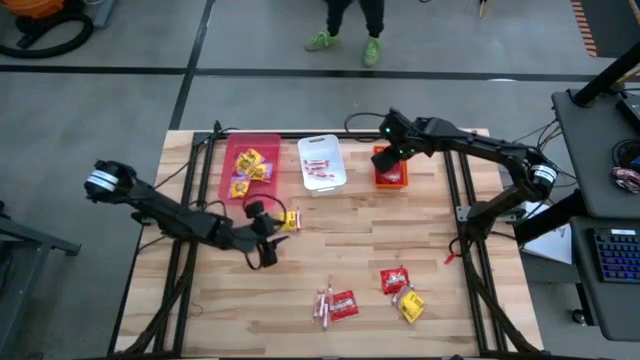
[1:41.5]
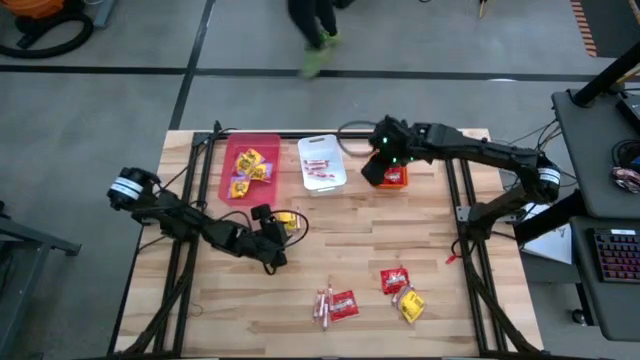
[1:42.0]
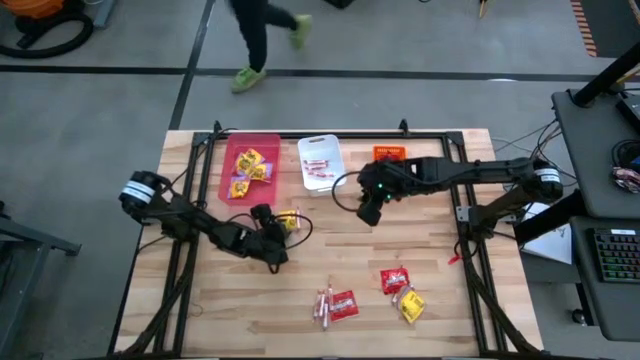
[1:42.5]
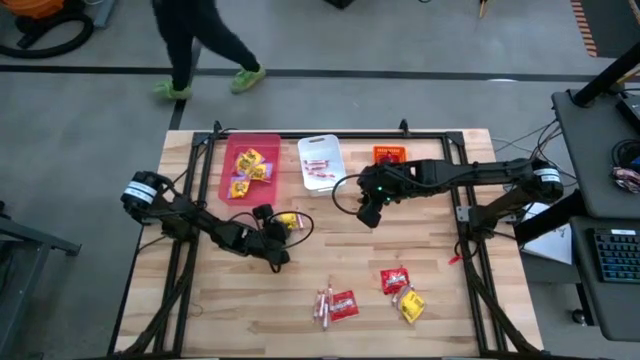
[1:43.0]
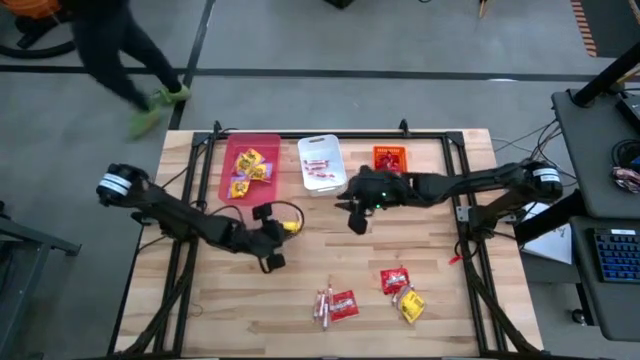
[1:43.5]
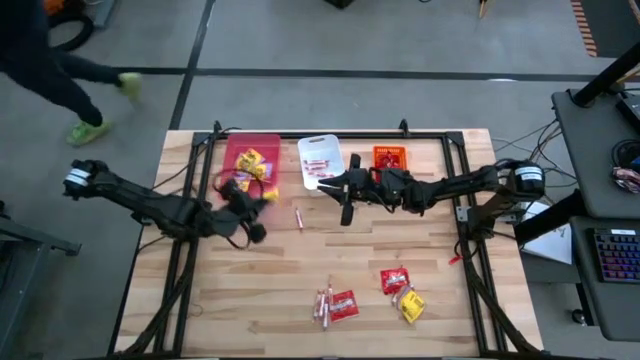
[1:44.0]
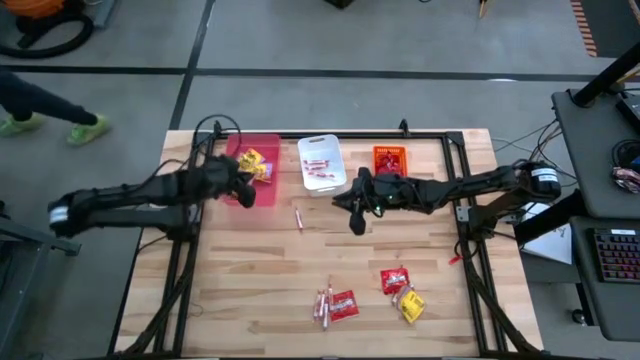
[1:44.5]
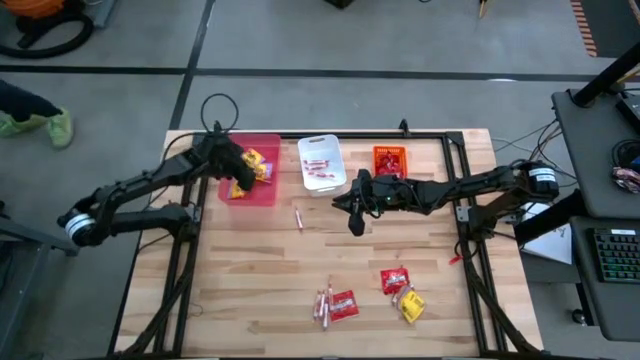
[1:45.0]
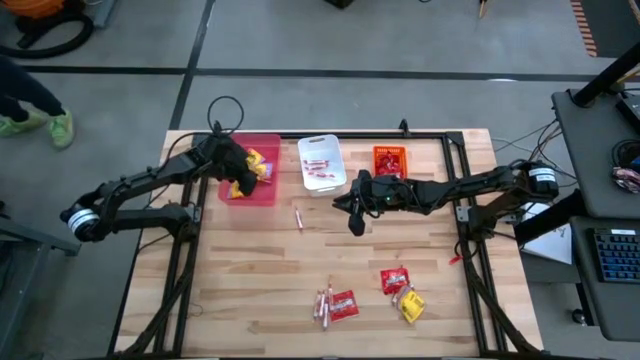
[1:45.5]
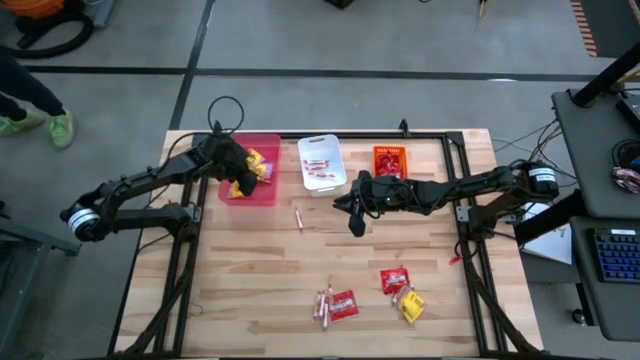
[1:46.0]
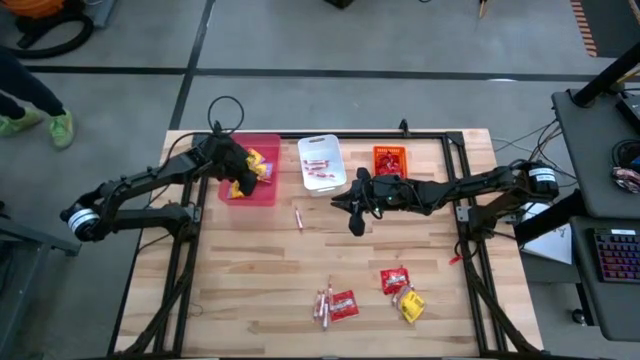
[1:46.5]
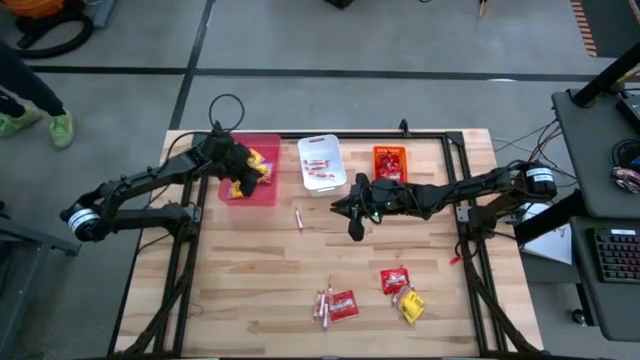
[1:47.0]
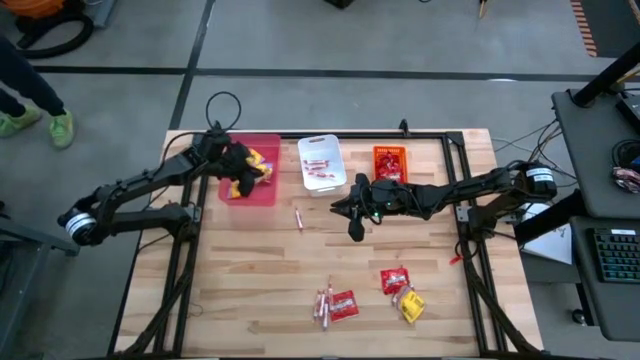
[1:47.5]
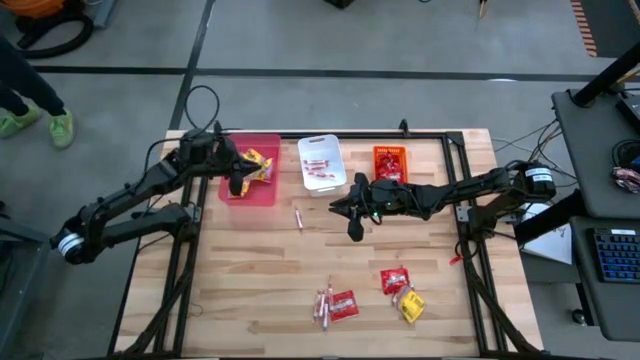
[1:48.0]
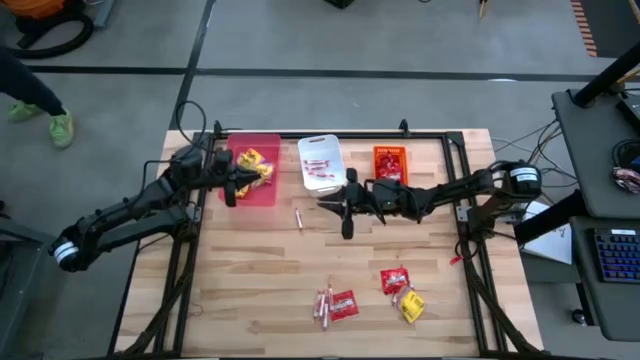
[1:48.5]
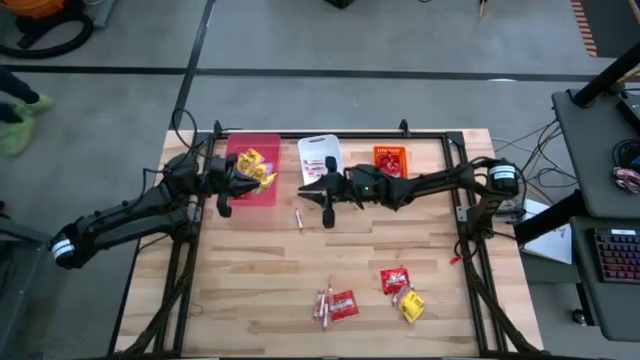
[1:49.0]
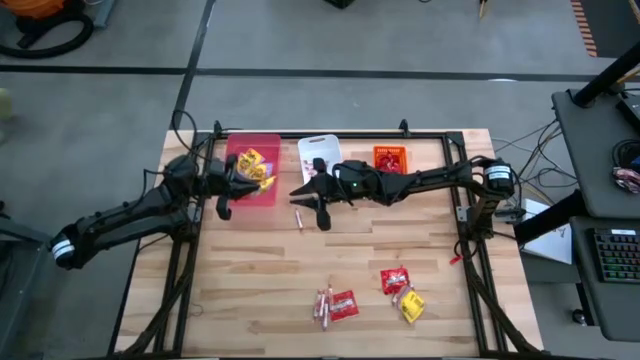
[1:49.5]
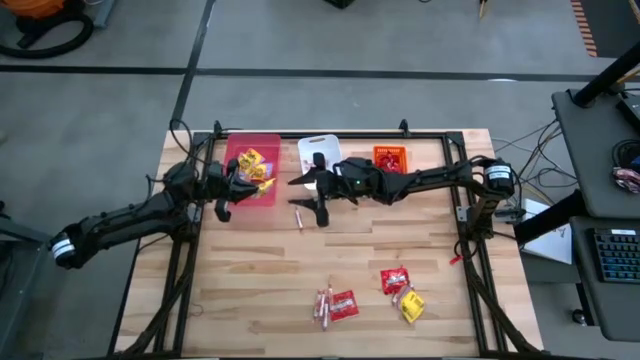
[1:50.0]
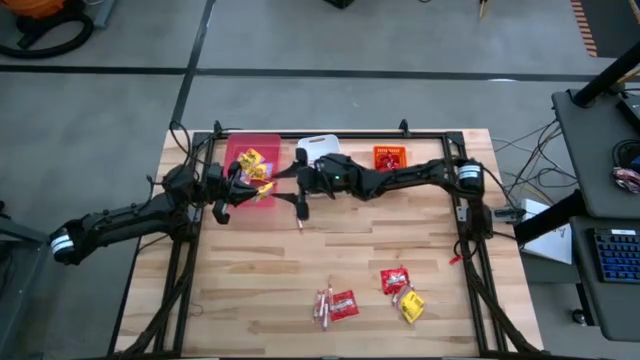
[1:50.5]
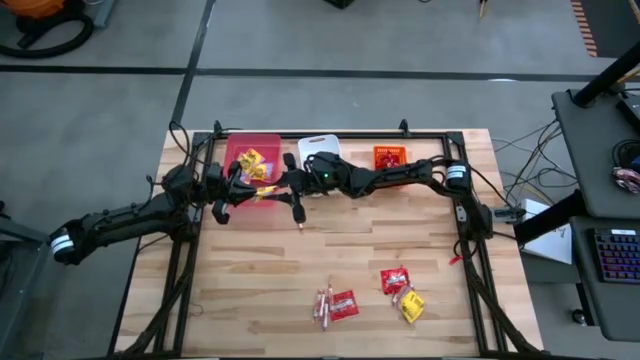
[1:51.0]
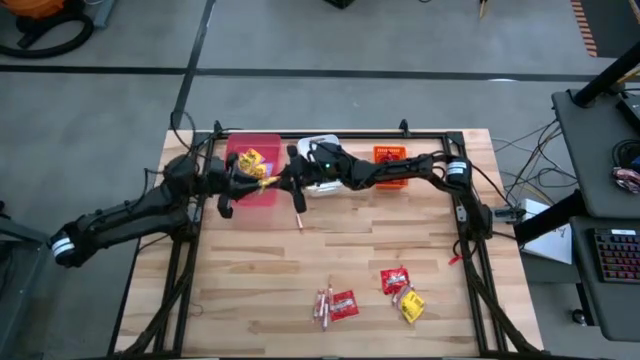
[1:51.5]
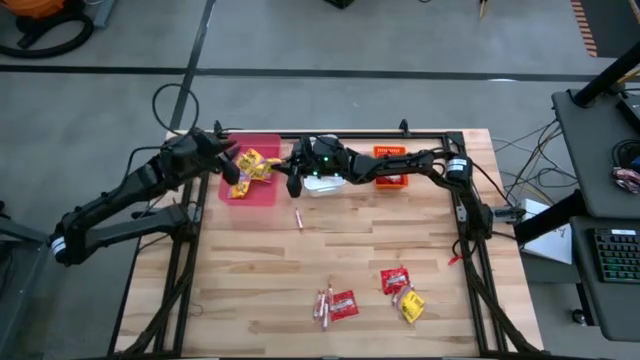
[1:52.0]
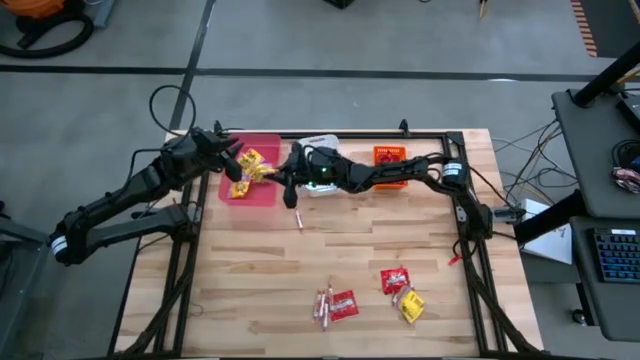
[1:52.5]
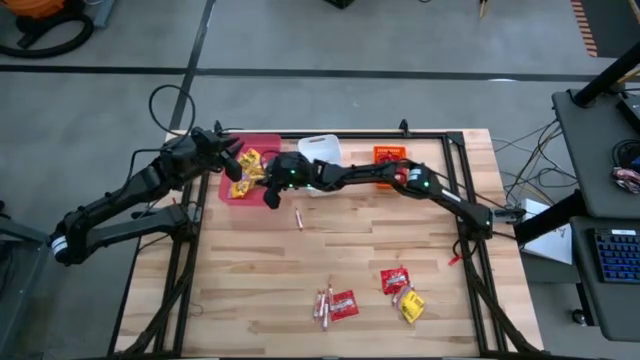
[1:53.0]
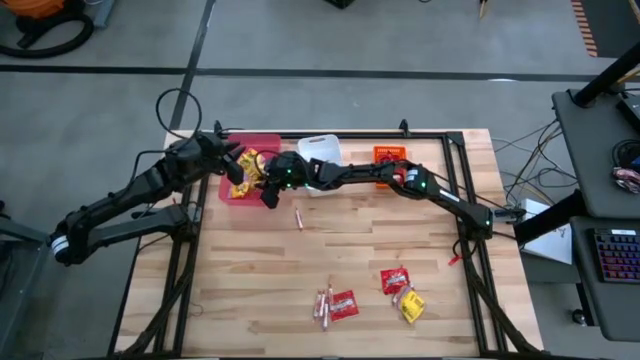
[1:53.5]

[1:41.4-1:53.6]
Task: Sort candy
Put the yellow candy into the pink bin

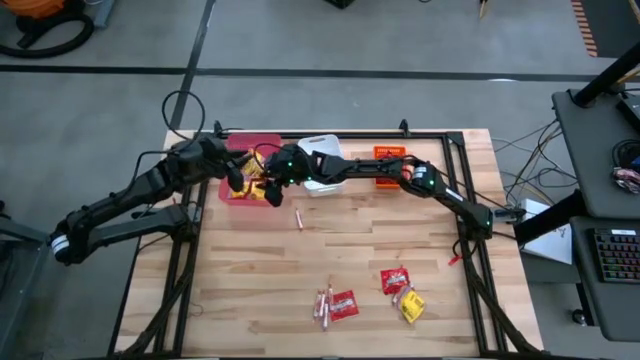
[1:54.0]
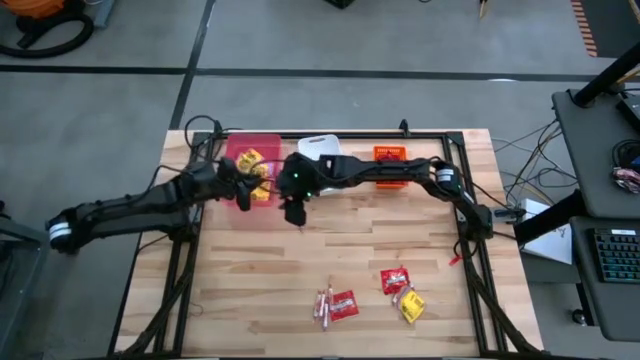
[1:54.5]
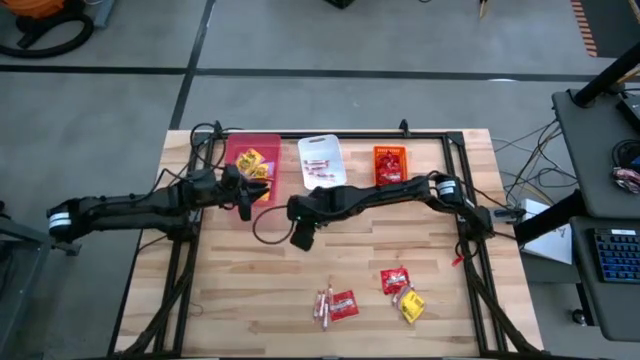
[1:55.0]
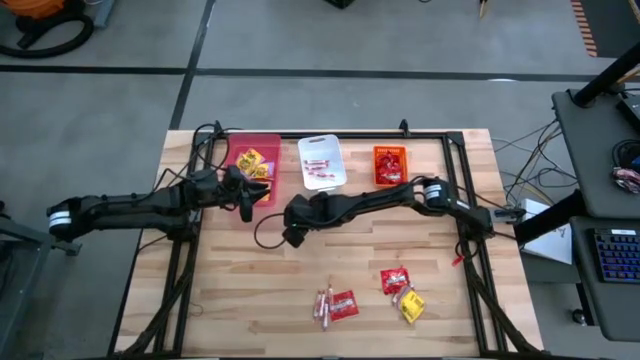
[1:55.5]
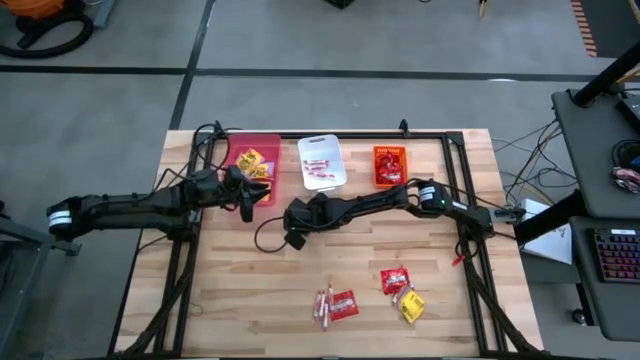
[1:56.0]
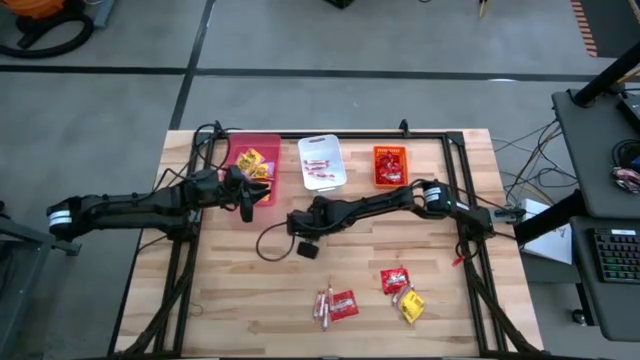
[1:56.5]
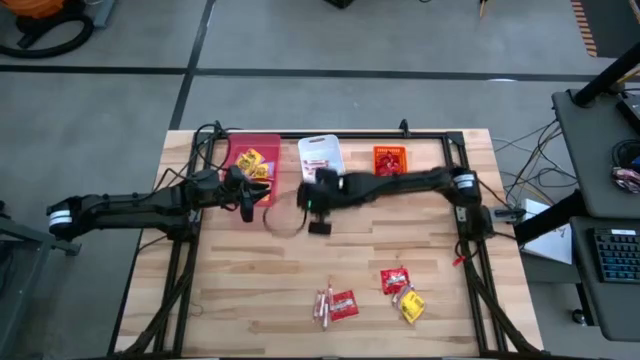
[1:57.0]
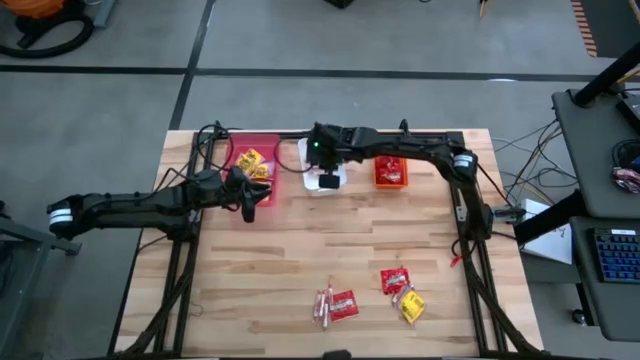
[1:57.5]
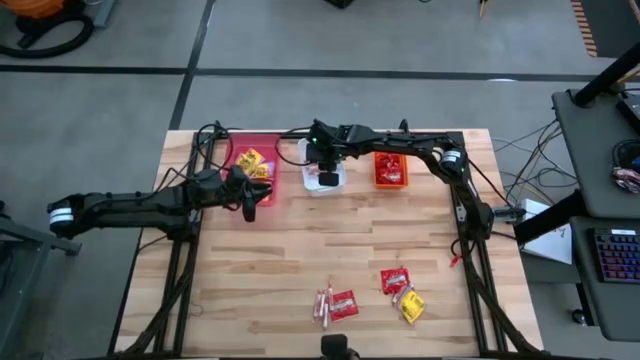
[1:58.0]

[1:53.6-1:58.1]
Put the white candy into the white bin

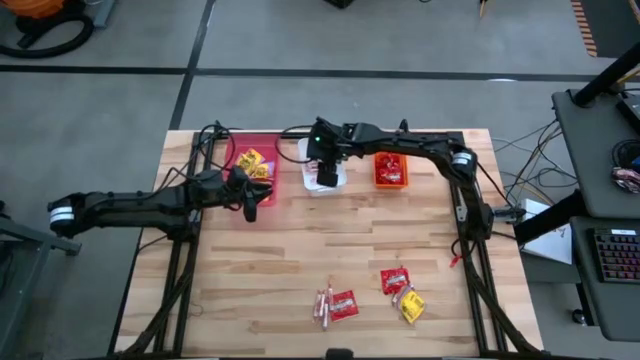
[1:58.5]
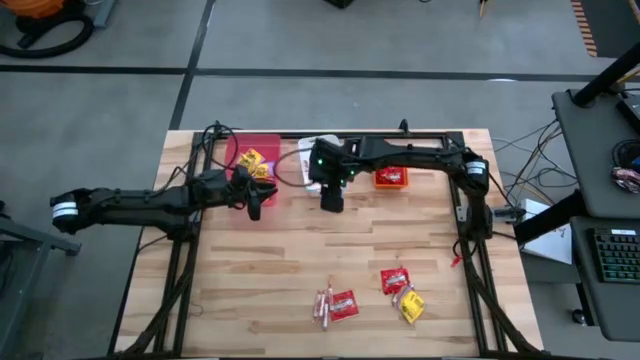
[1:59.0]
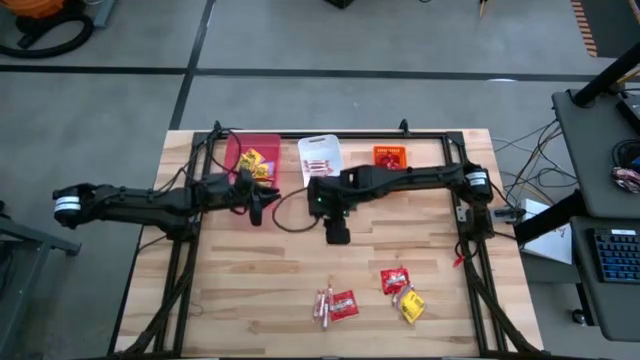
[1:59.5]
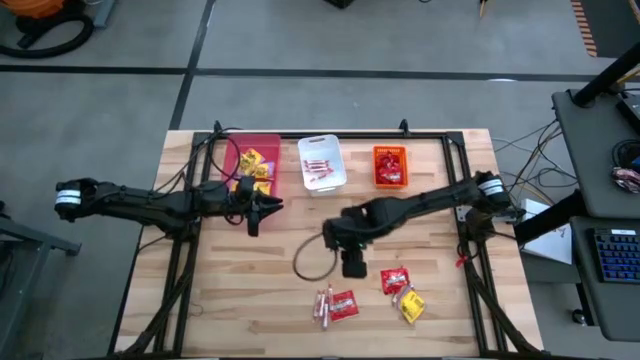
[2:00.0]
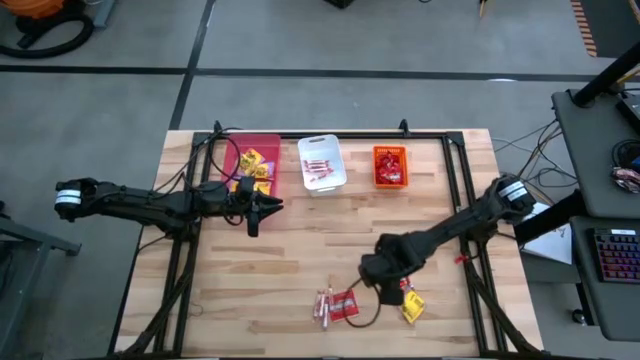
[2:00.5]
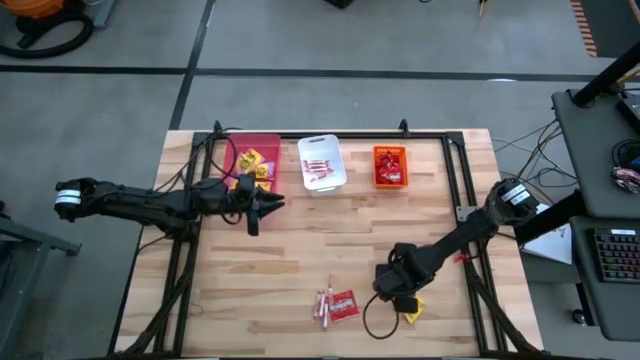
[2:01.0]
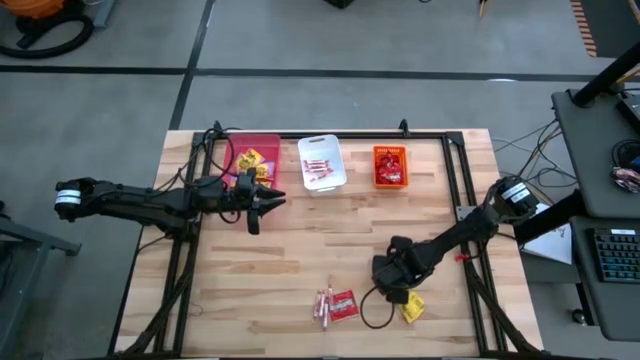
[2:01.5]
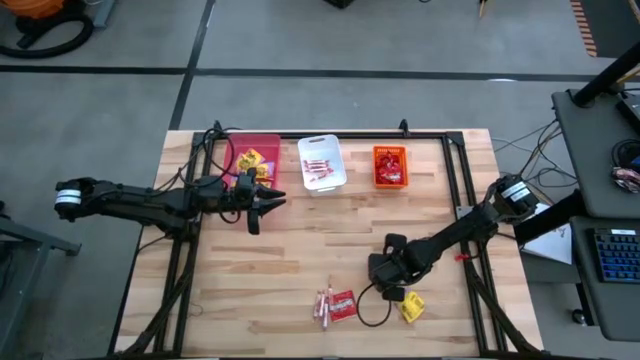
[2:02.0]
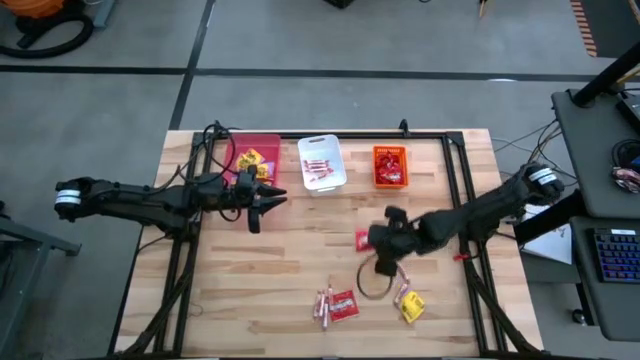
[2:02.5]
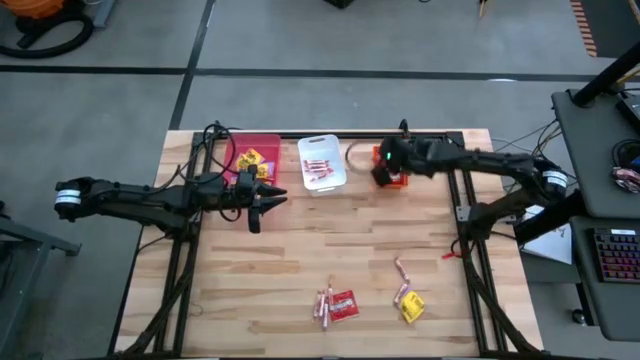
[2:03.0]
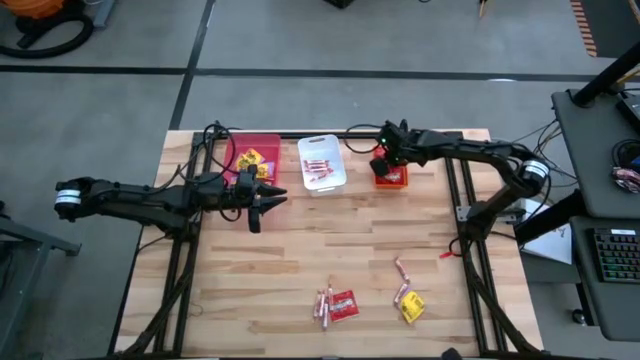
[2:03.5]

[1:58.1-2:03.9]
Put the red candy into the orange bin
